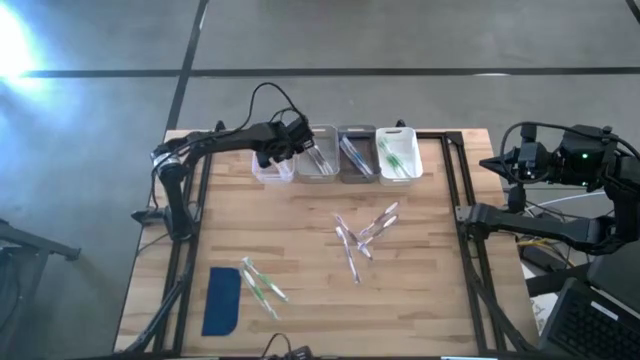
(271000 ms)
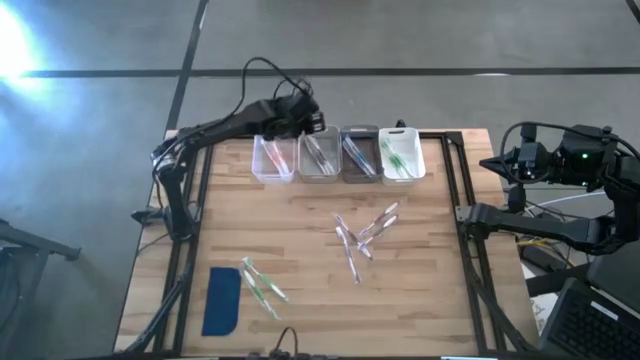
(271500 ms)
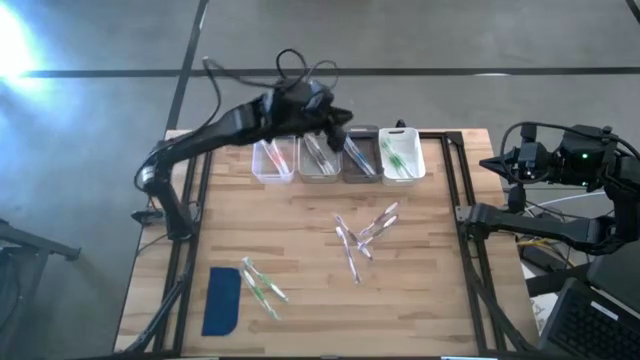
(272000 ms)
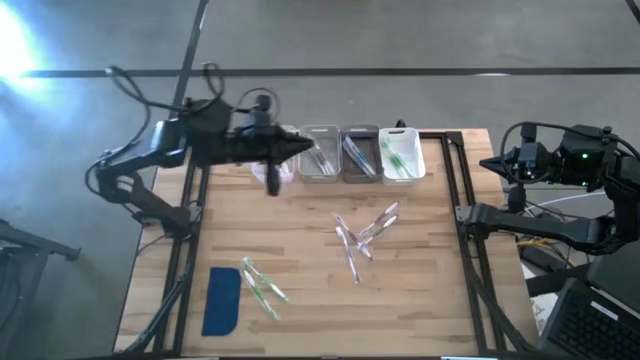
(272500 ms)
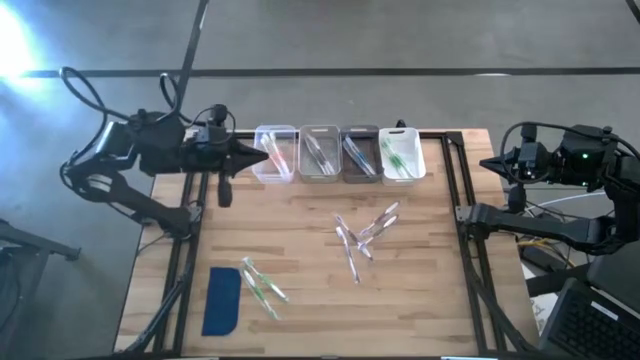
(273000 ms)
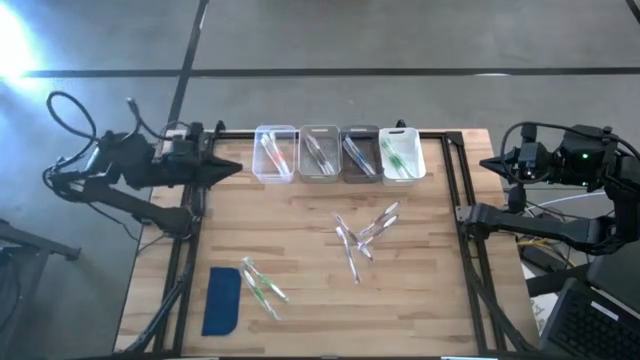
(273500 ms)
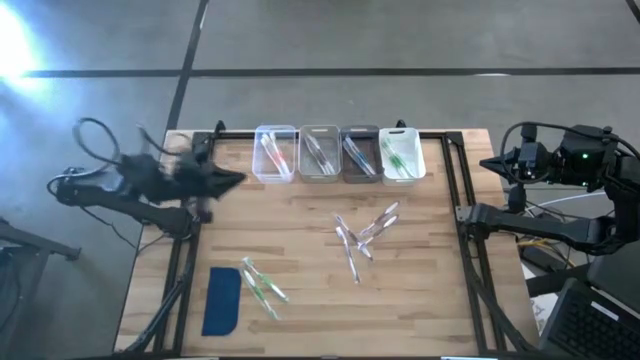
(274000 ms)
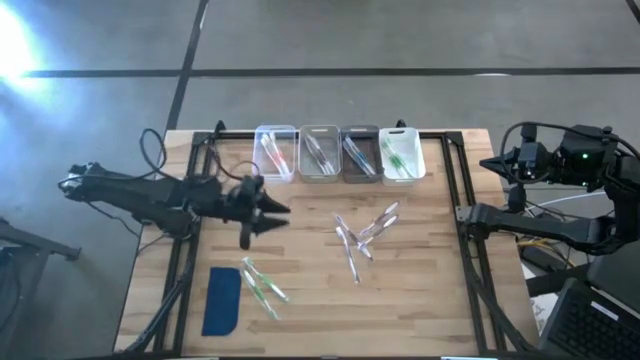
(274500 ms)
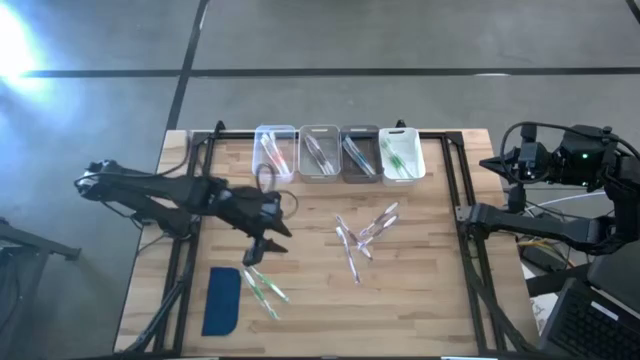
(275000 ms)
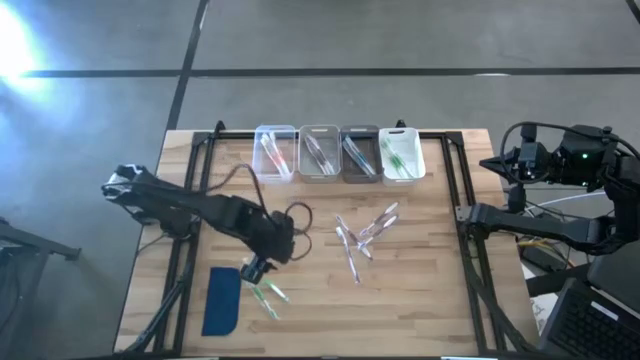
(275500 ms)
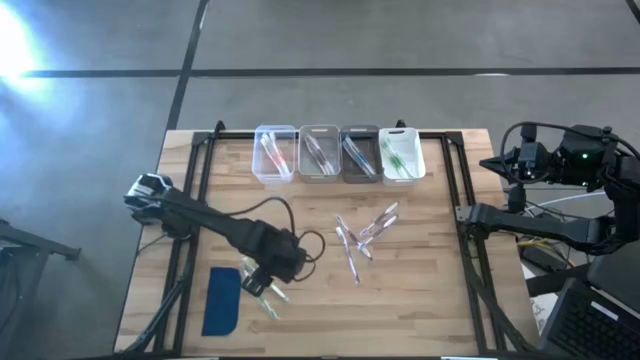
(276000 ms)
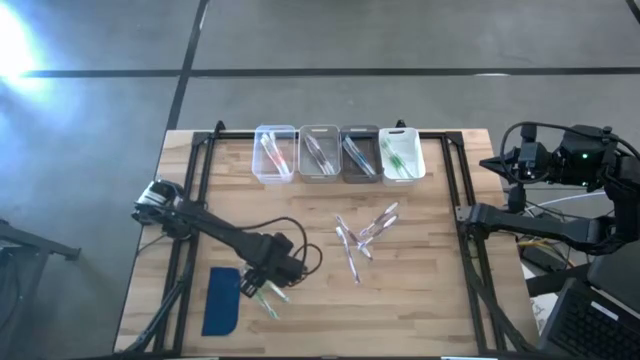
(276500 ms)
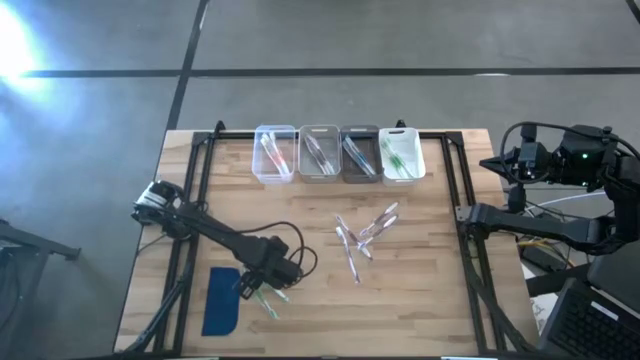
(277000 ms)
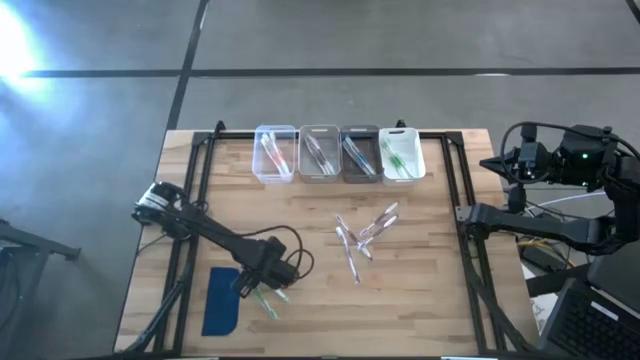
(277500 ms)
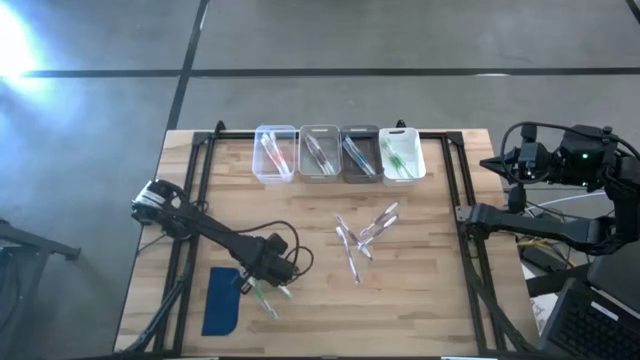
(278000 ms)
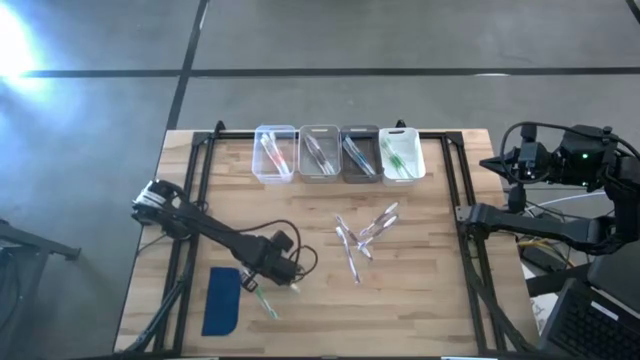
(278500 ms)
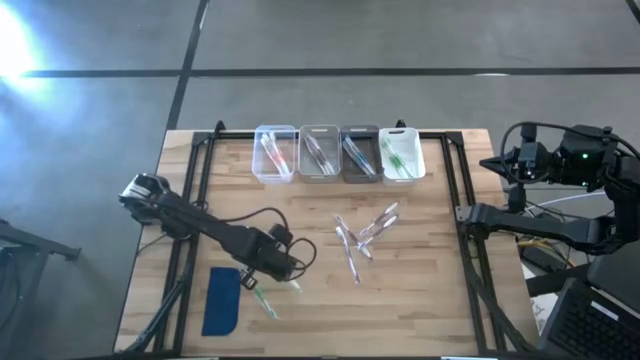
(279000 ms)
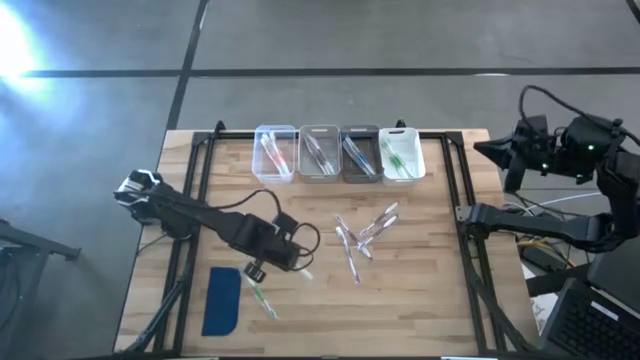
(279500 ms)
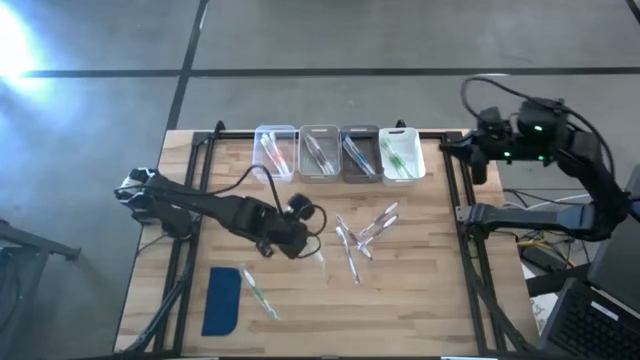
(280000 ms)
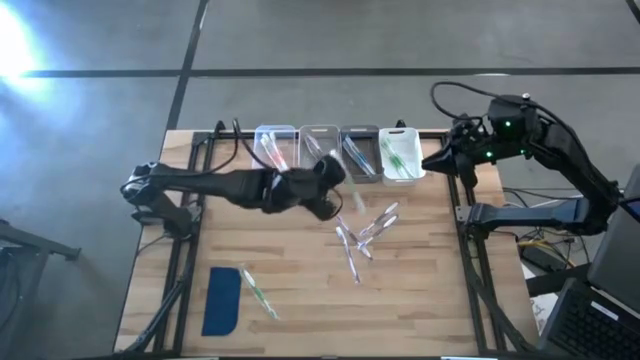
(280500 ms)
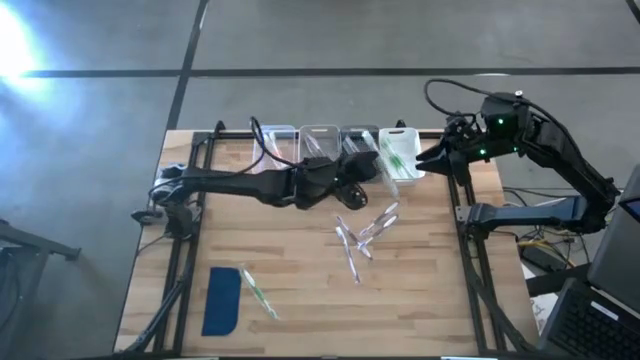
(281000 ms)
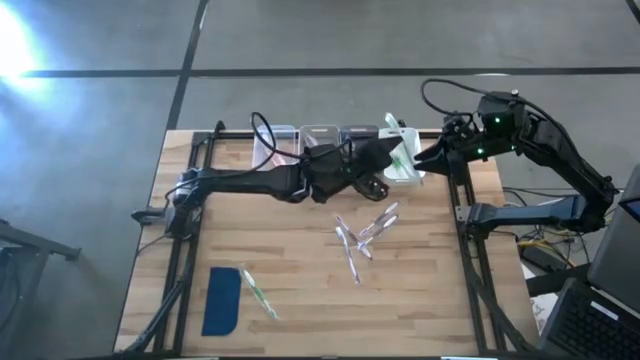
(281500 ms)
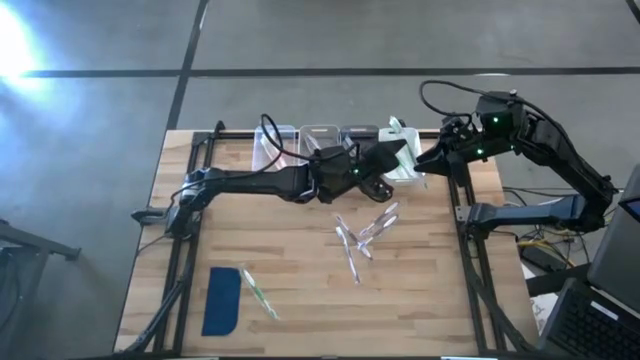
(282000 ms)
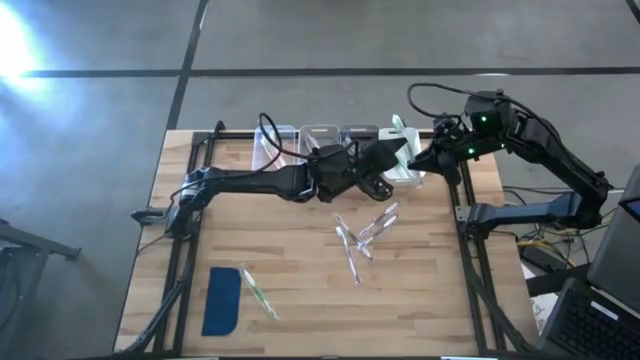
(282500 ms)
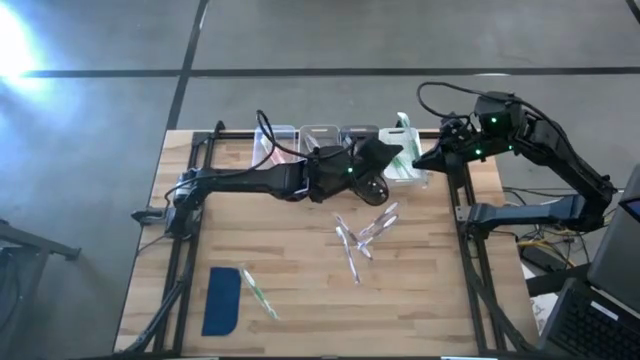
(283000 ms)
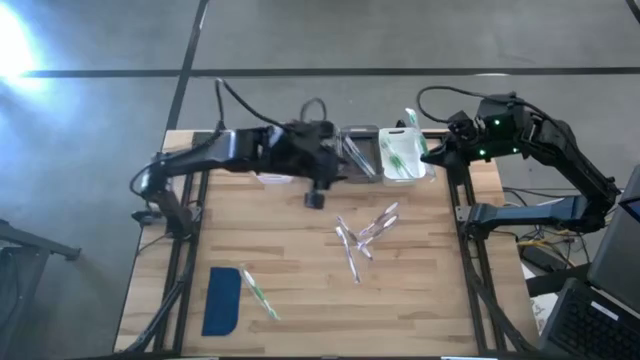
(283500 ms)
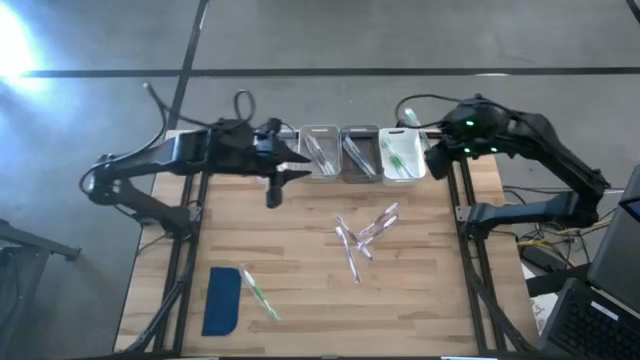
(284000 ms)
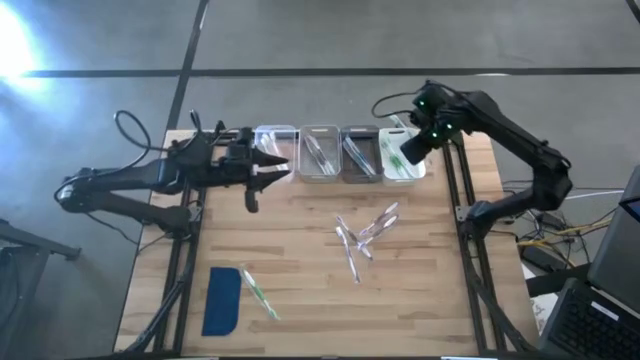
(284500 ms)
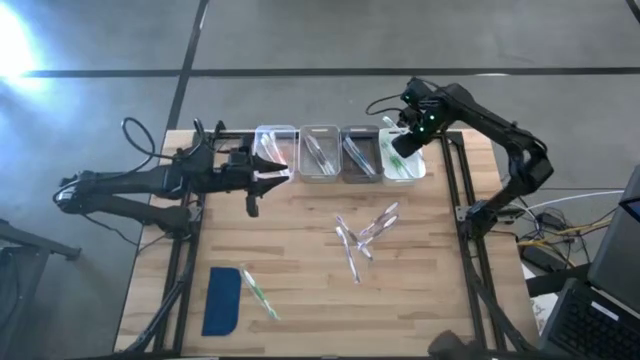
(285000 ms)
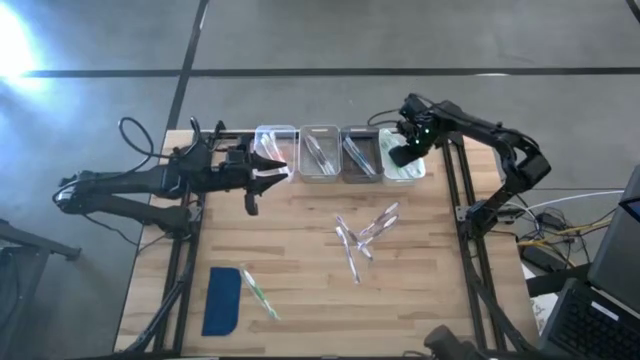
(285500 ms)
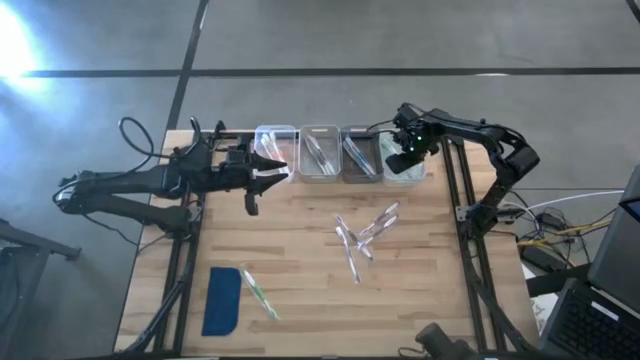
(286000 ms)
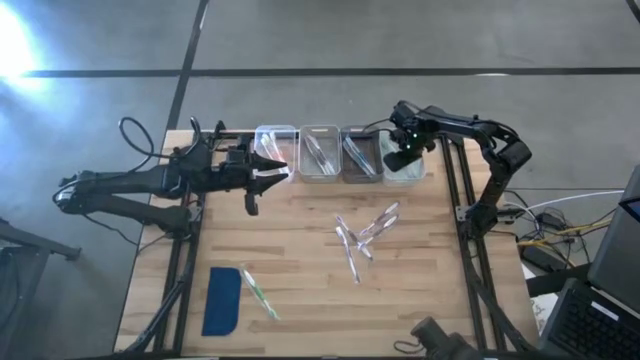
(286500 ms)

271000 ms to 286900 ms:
Task: Pick & Place Toothbrushes
Put the green toothbrush into the white bin

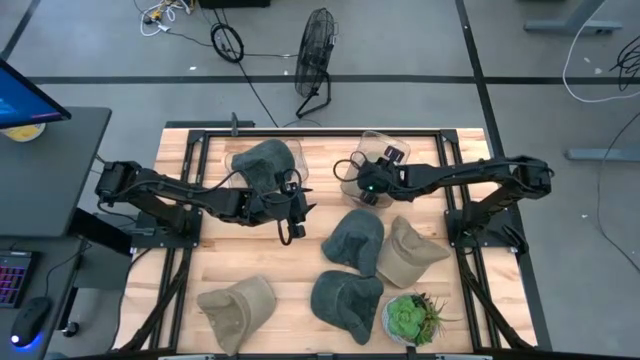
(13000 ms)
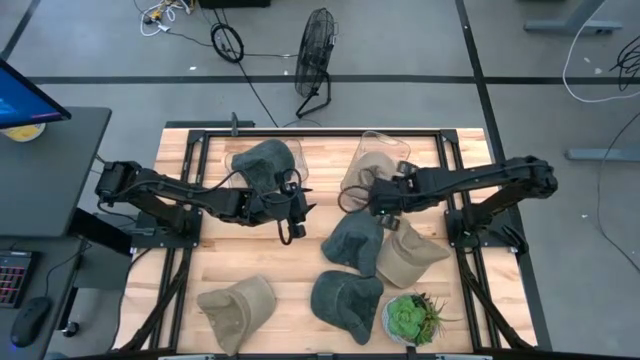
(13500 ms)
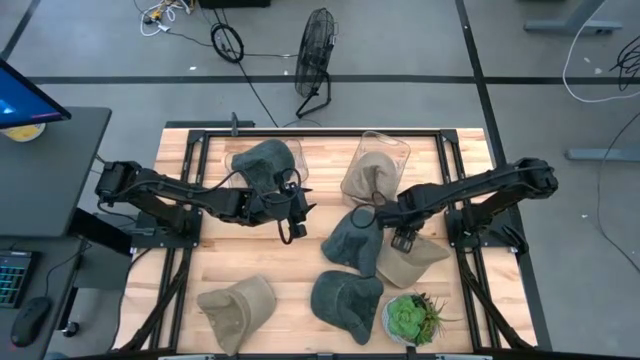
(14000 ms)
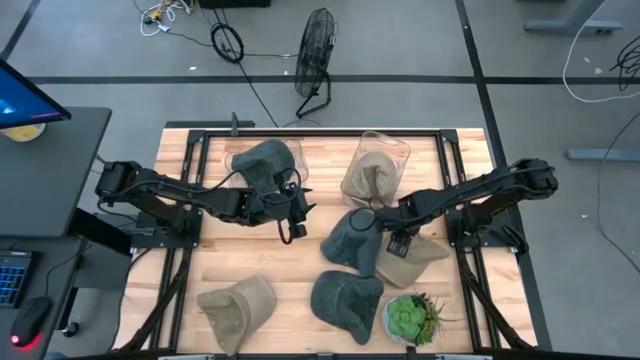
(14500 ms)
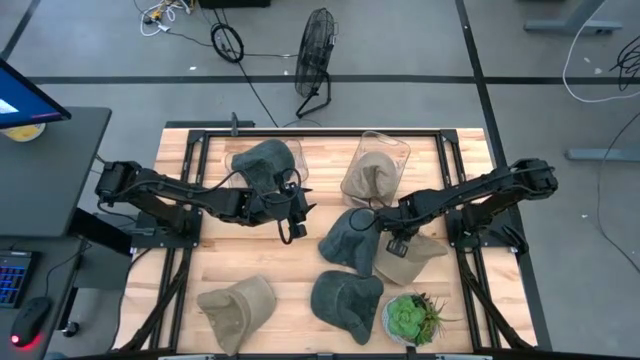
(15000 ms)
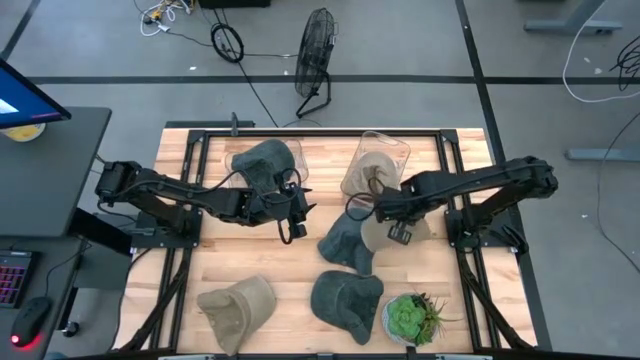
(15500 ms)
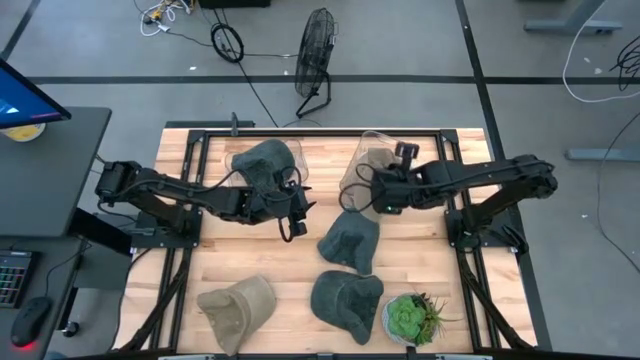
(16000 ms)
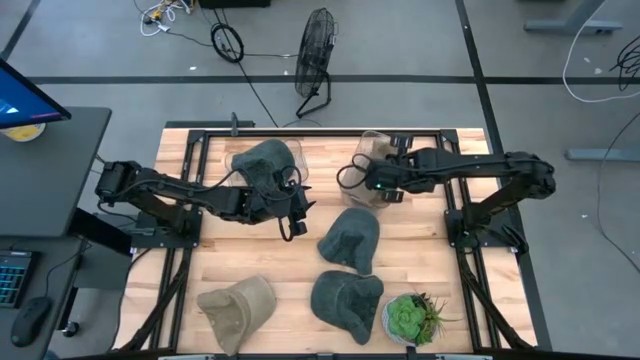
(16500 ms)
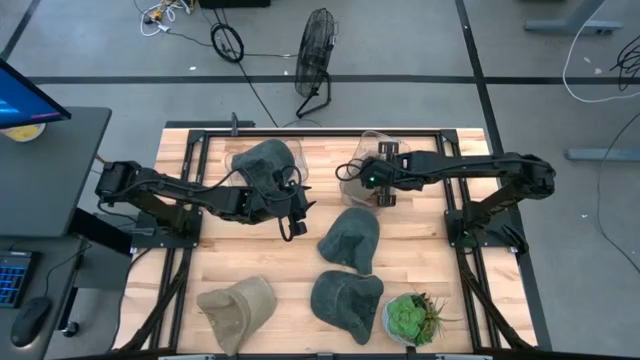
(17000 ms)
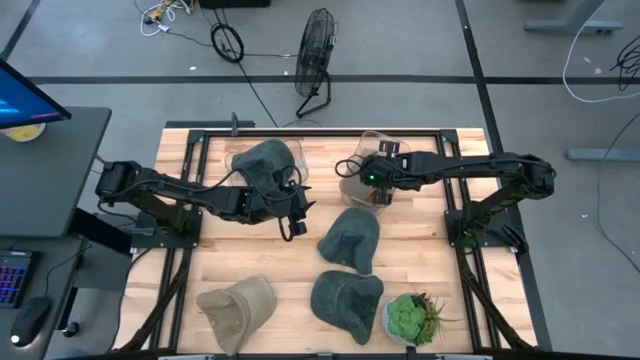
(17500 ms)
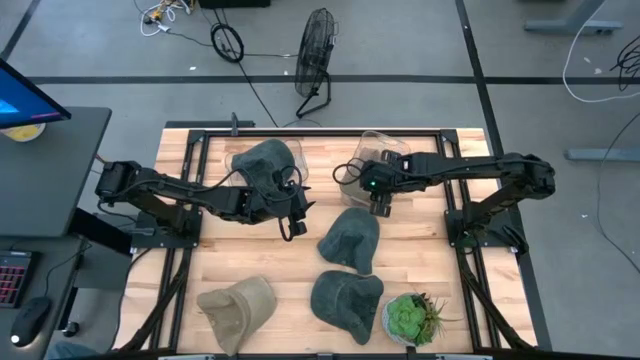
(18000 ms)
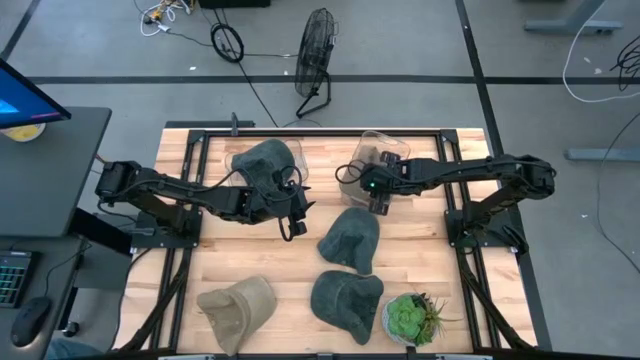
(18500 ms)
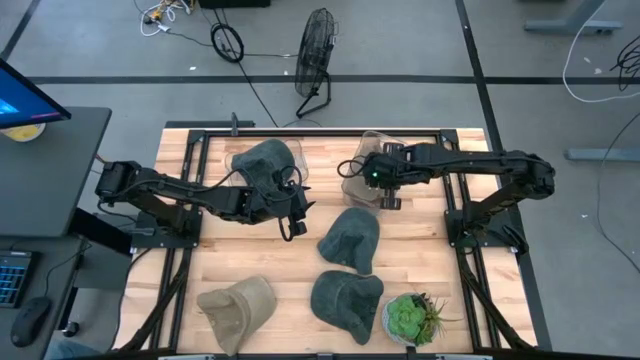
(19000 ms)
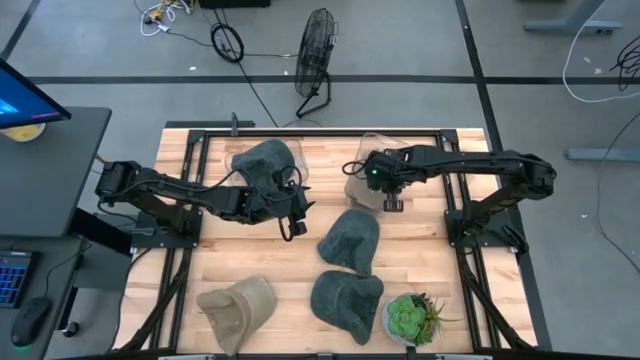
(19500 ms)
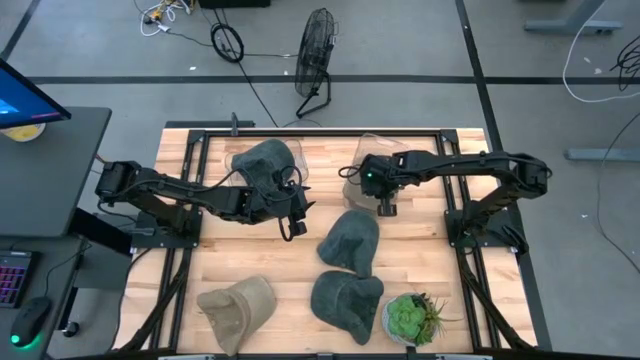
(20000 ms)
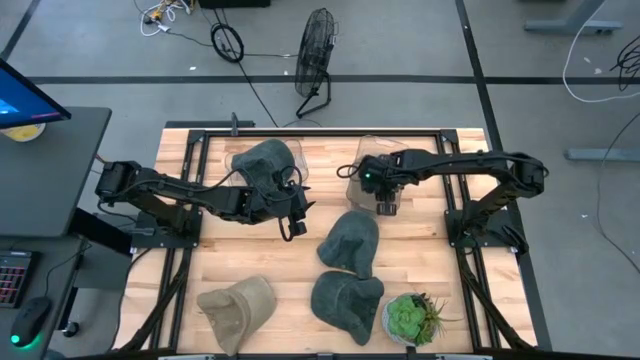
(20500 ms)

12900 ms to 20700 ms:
Task: Pick & Place hat
Put the right brown cap into the right transparent bin
